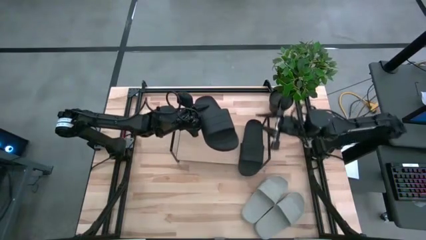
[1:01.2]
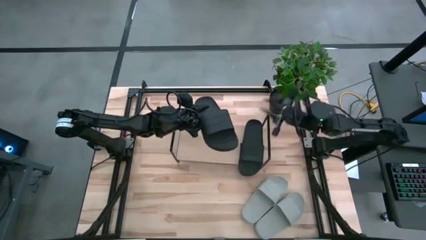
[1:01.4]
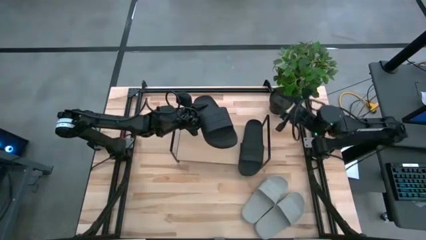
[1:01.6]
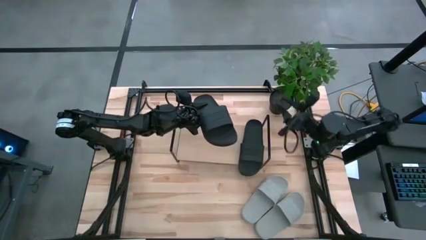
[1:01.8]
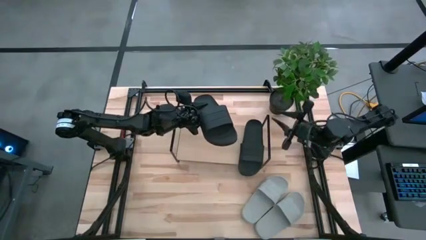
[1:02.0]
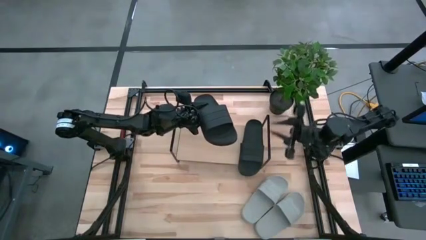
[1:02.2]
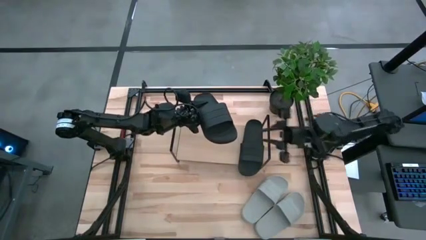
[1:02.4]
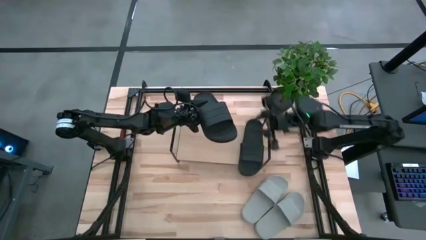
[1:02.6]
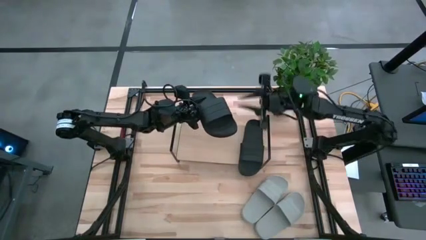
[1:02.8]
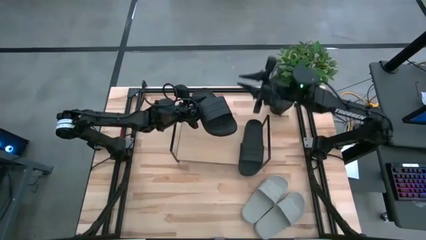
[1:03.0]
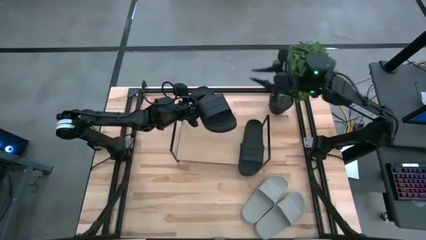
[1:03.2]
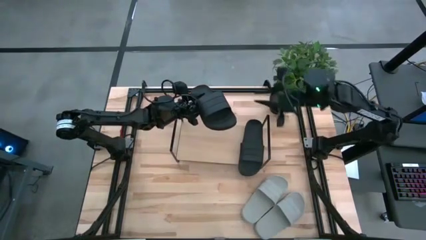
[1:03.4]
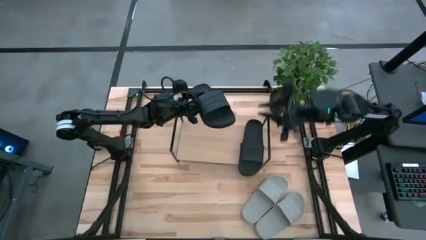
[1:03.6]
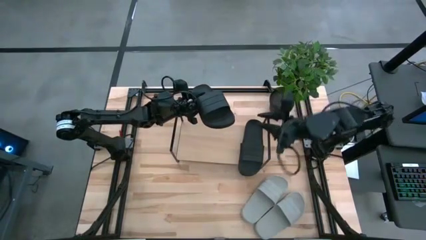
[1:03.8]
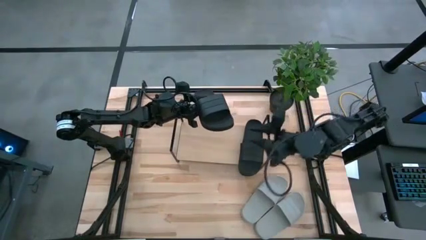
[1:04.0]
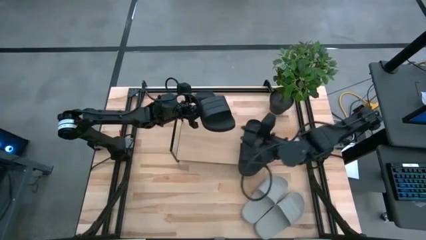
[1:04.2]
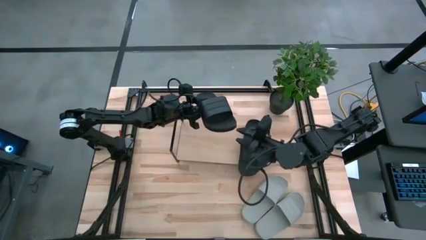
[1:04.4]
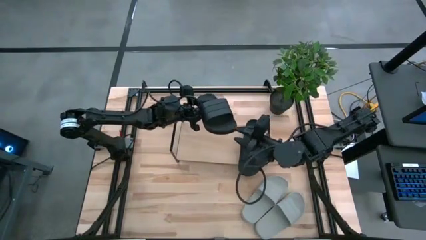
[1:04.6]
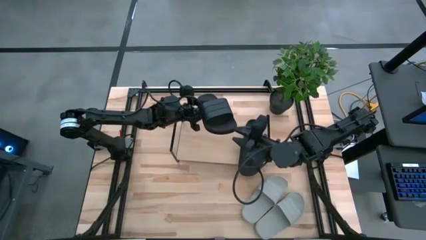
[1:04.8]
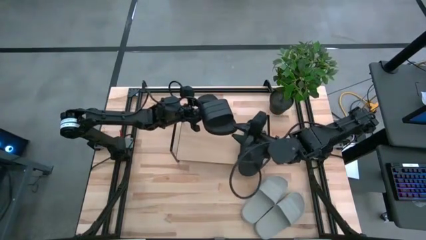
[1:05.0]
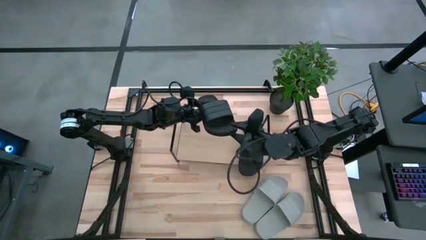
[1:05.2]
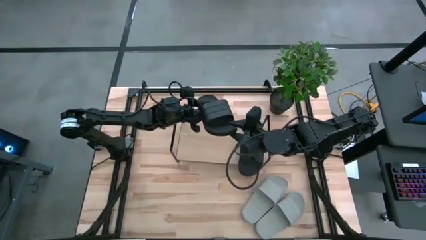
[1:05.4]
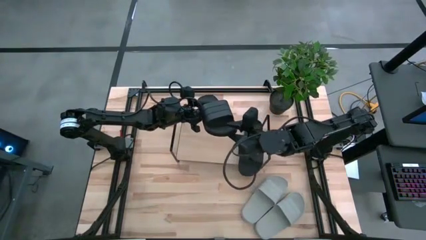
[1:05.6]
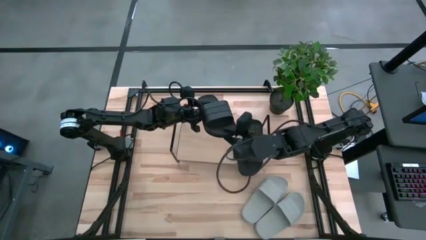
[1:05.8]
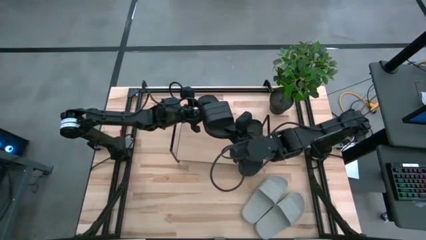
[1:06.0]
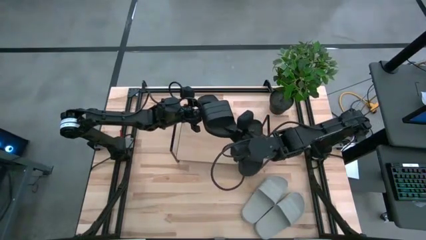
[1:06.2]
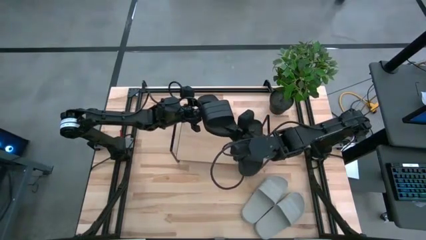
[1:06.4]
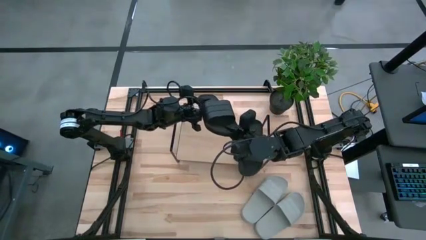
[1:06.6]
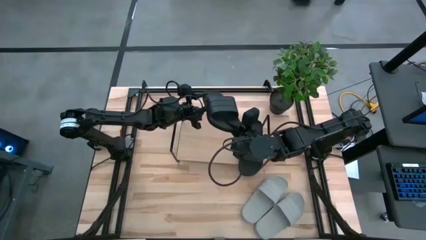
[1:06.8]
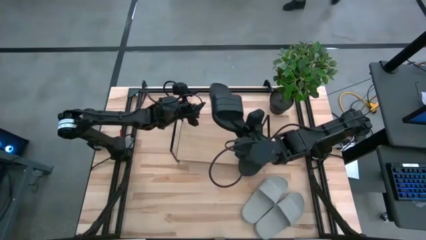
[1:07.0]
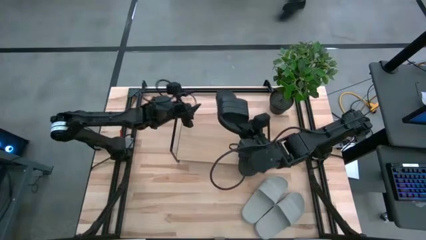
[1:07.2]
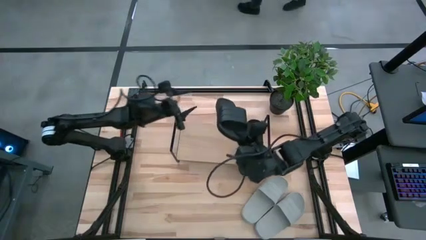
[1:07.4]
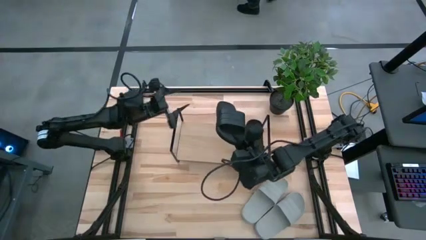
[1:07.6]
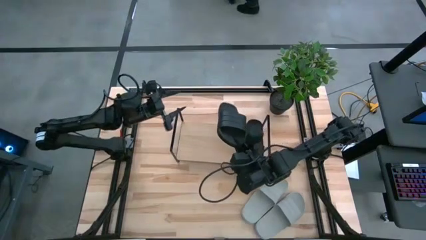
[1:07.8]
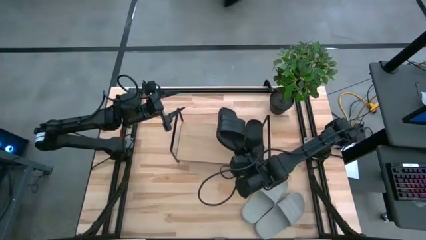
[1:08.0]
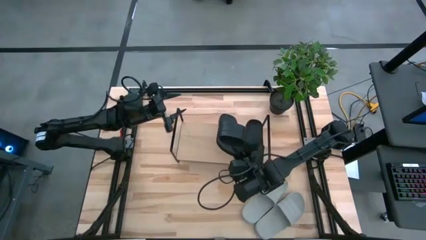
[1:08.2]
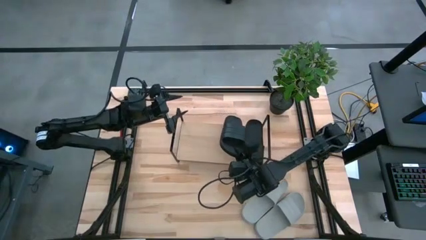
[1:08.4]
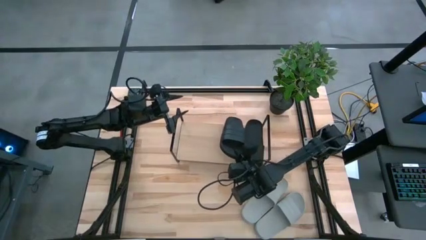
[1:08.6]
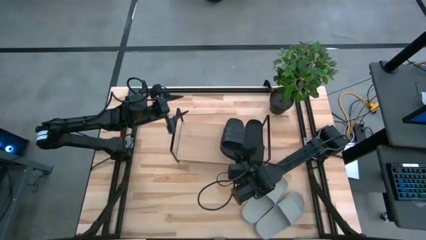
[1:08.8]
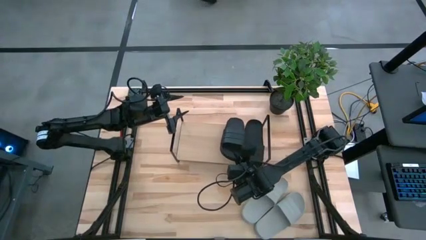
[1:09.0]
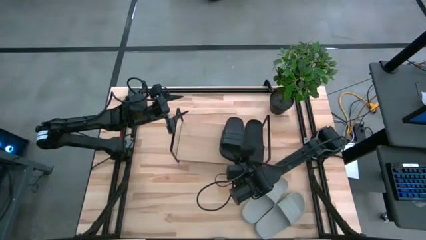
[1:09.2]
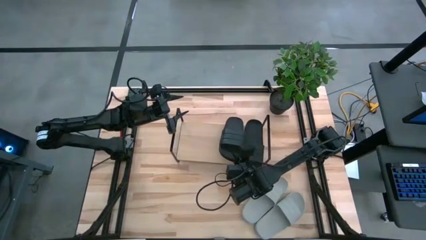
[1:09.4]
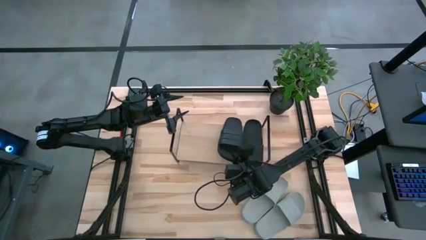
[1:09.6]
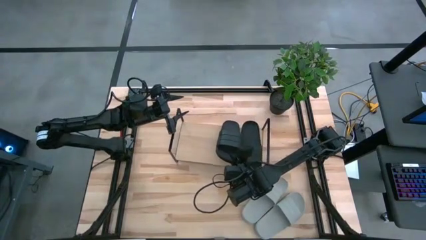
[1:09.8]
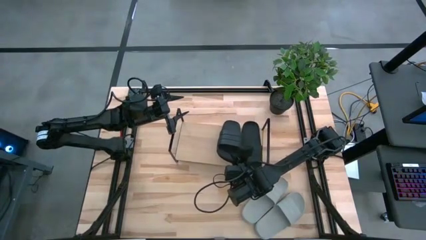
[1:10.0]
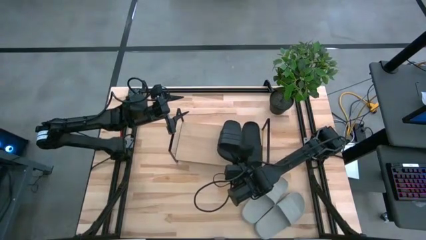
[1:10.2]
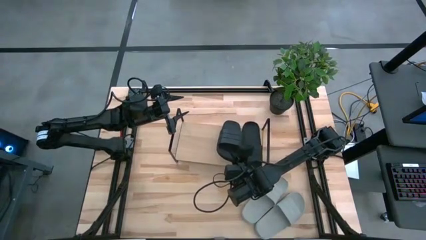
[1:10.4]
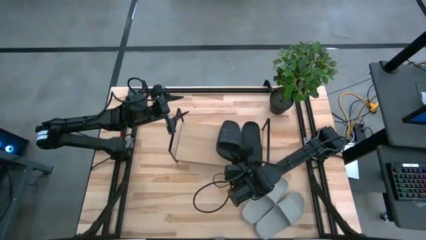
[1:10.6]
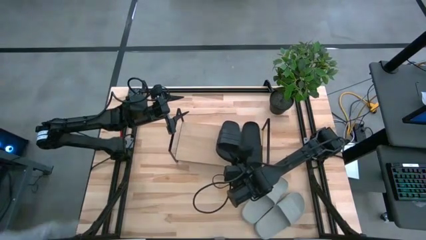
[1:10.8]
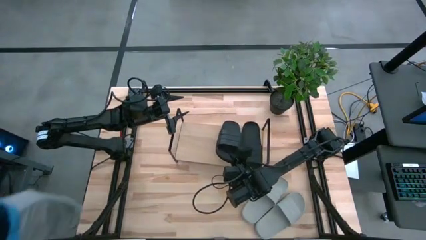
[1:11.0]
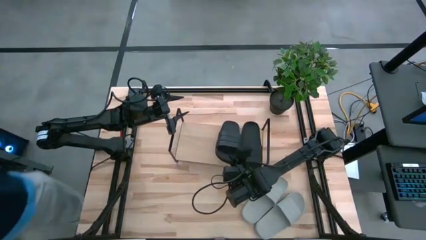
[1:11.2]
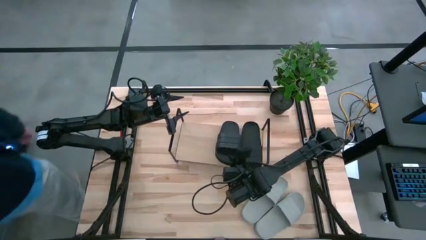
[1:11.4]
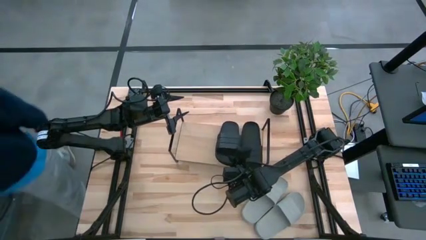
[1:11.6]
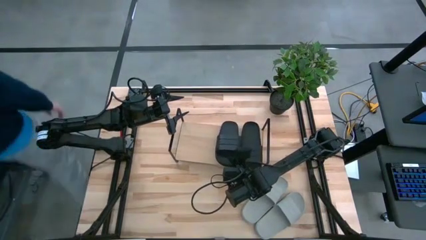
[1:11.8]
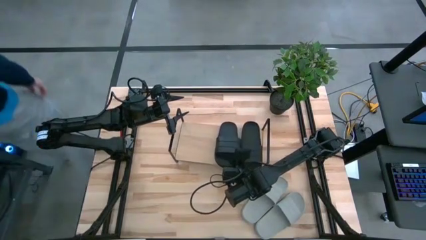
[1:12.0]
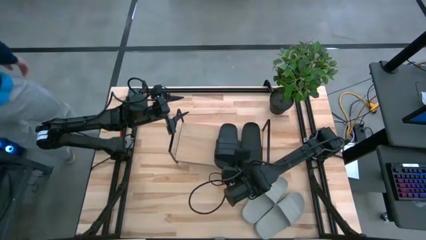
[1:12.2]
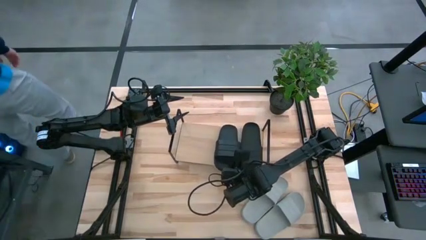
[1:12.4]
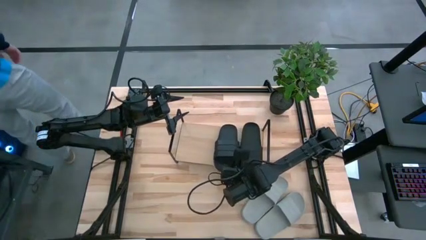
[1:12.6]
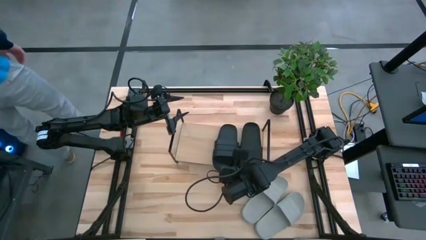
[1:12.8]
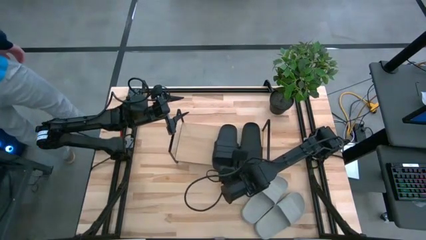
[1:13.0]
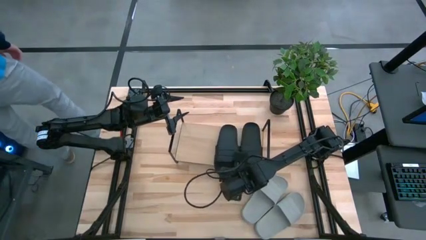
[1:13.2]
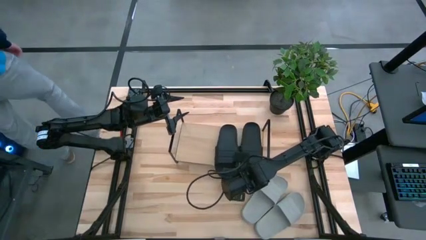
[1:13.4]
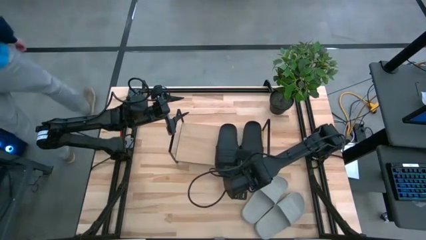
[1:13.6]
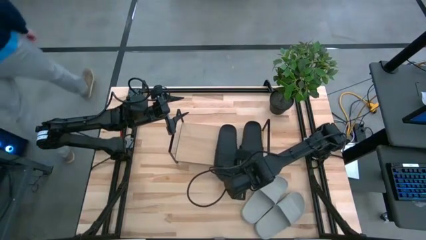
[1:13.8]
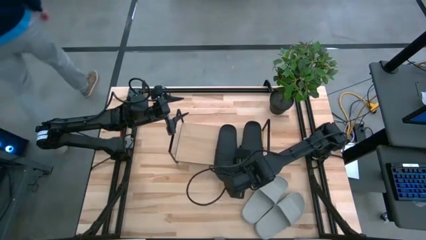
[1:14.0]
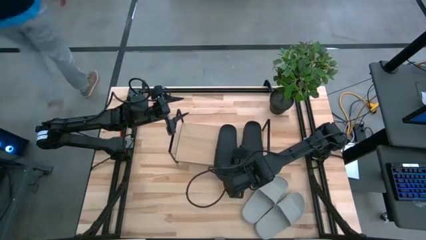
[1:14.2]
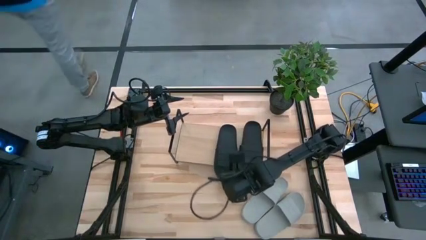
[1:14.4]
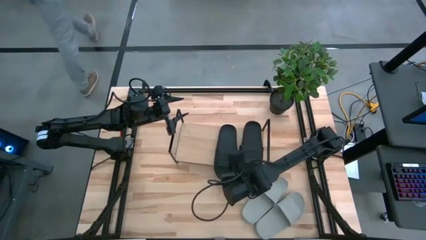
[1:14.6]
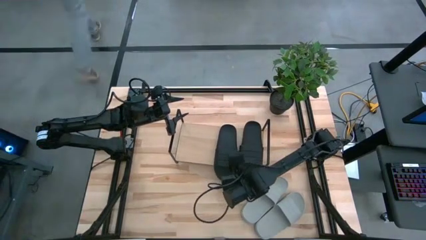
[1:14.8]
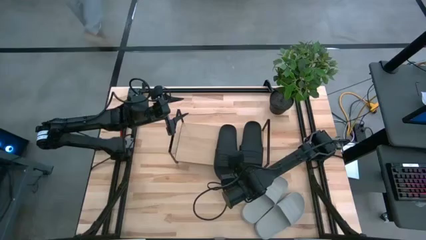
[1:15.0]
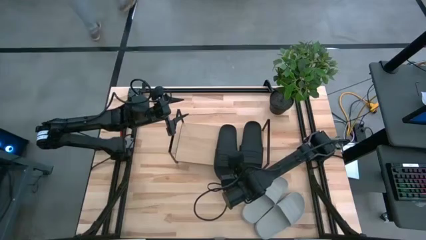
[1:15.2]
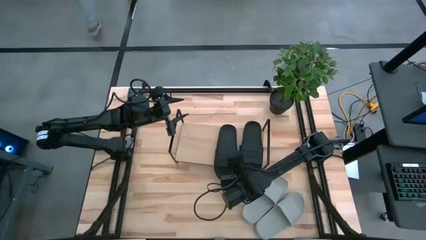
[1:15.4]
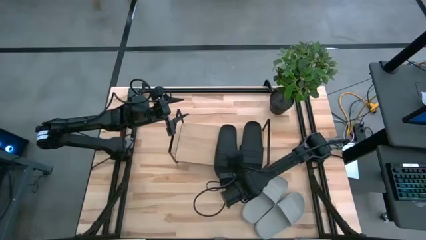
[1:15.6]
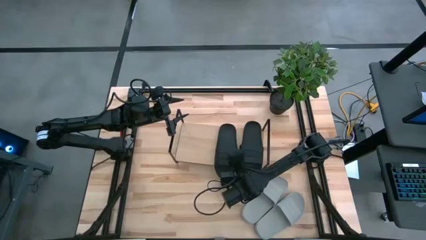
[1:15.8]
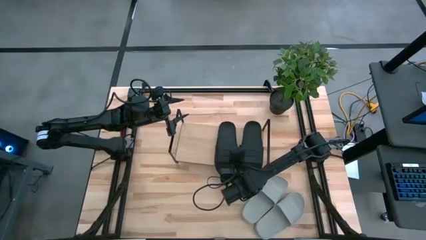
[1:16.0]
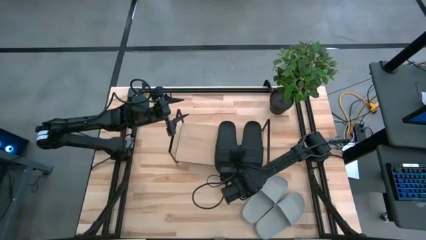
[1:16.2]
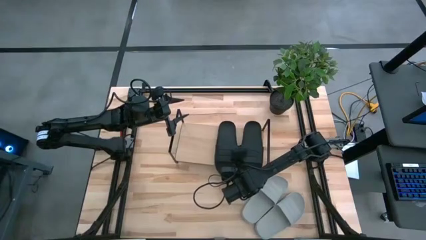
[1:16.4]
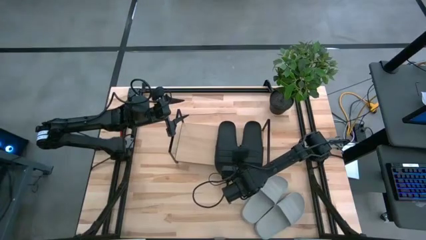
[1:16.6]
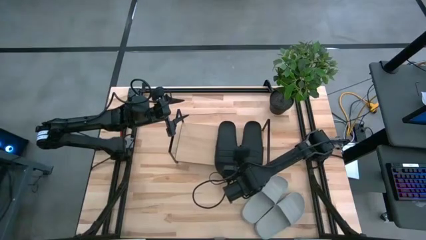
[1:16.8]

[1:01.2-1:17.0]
Task: Pick and place slides into the shelf
Put the black slides on the shelf
